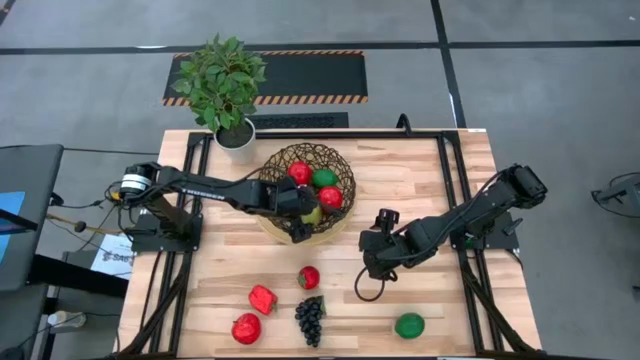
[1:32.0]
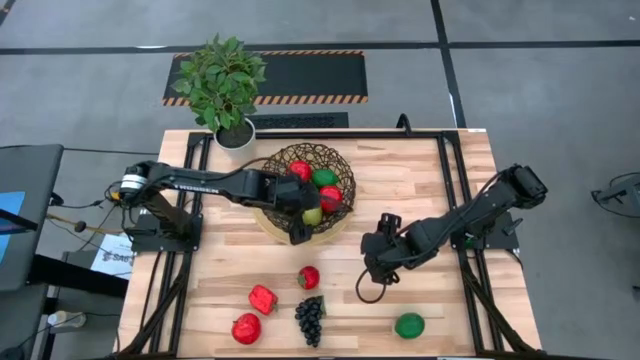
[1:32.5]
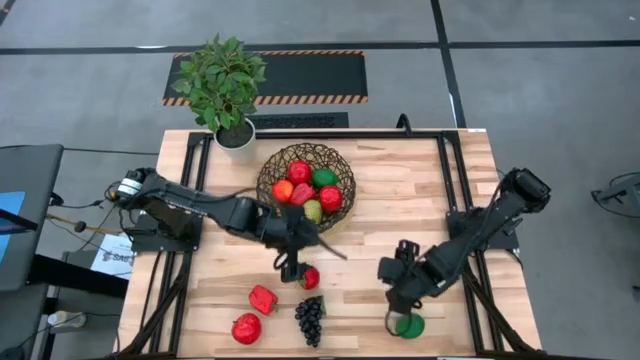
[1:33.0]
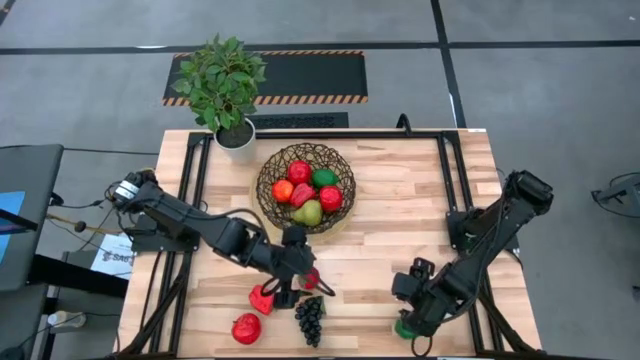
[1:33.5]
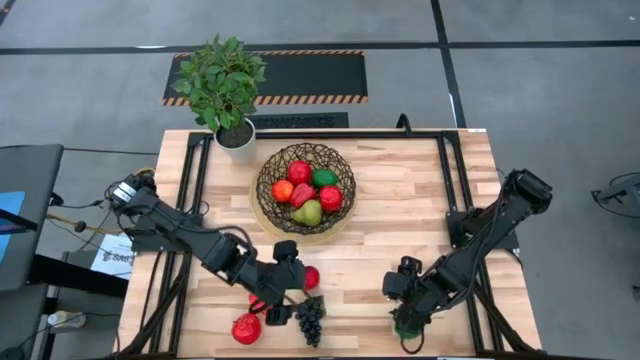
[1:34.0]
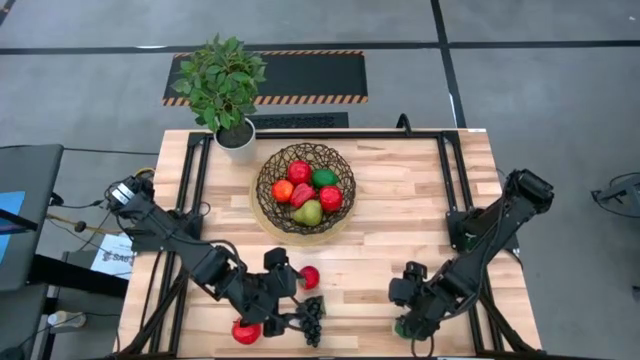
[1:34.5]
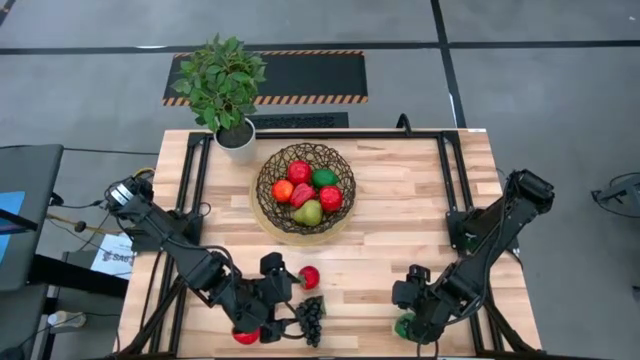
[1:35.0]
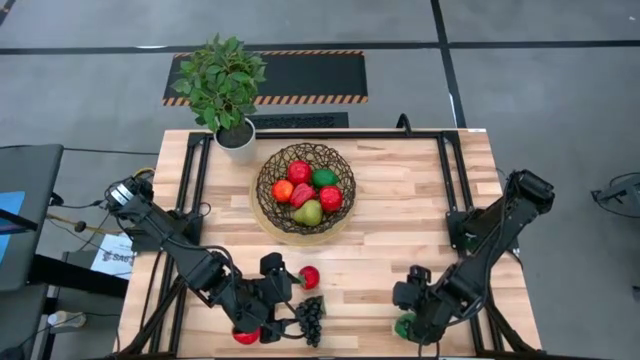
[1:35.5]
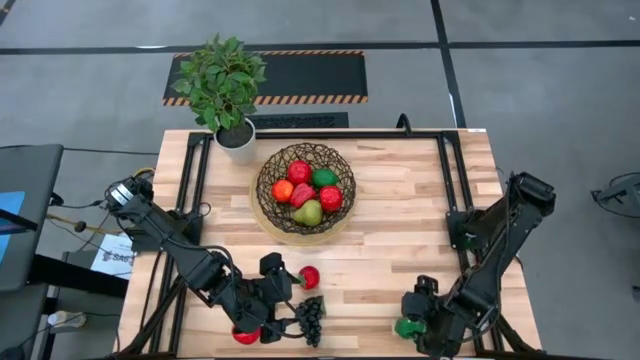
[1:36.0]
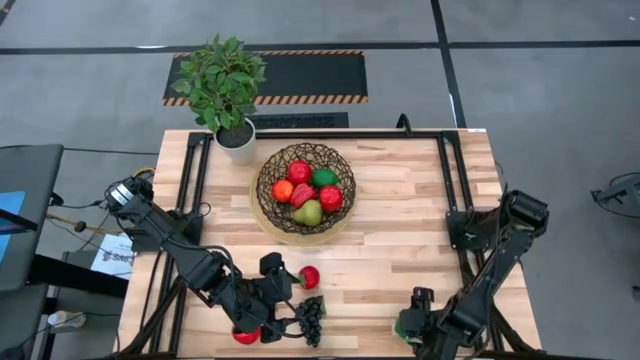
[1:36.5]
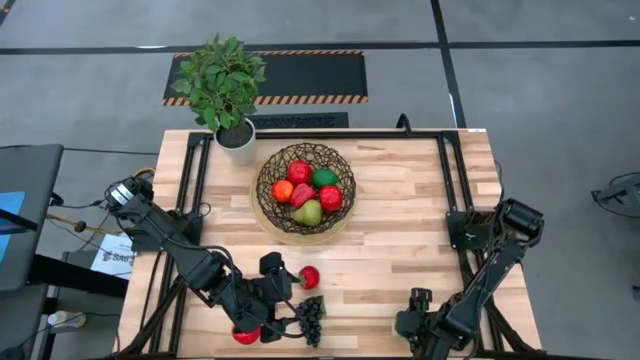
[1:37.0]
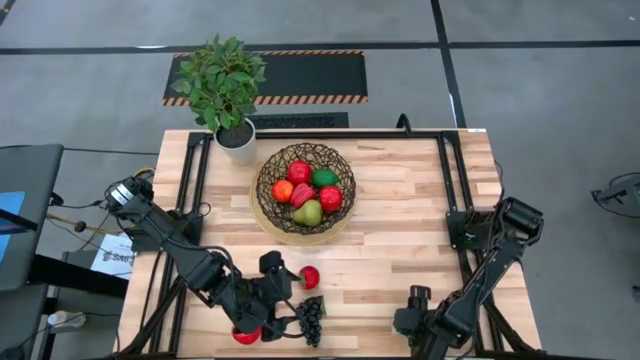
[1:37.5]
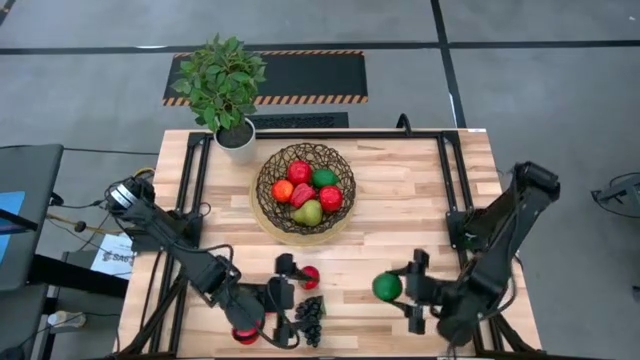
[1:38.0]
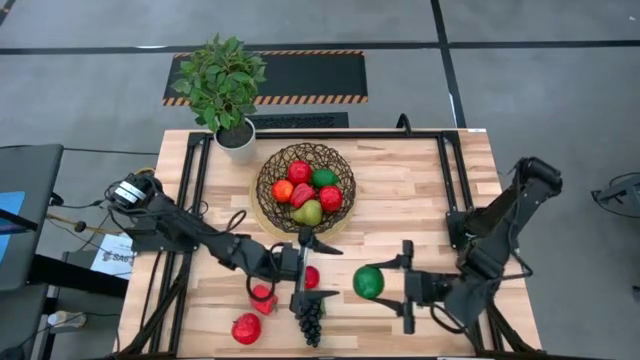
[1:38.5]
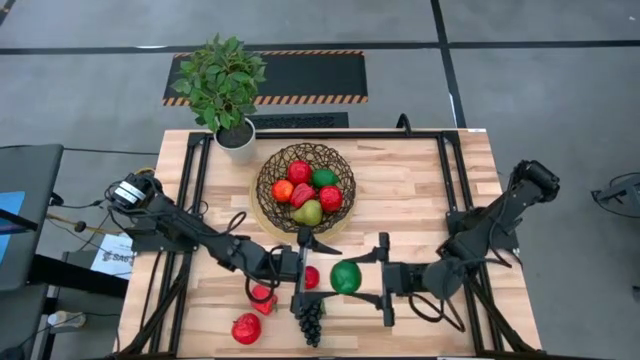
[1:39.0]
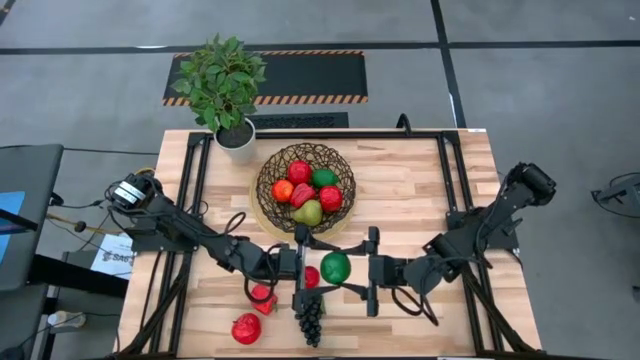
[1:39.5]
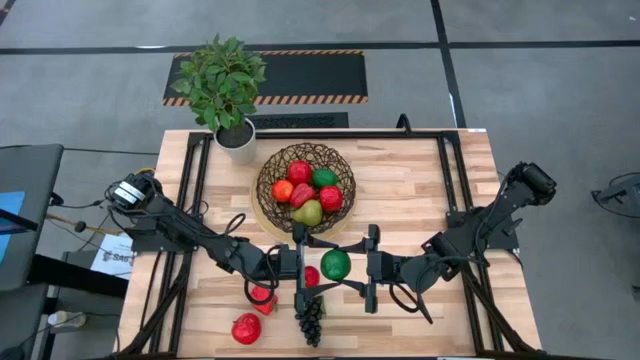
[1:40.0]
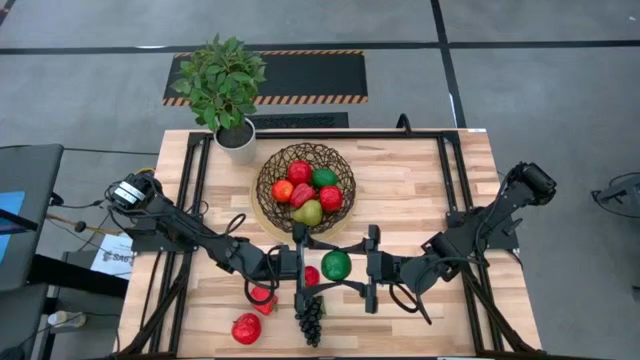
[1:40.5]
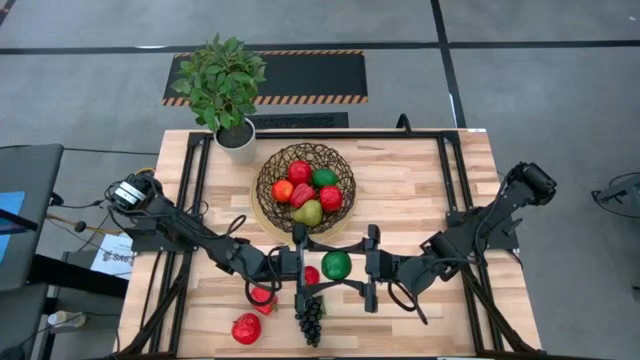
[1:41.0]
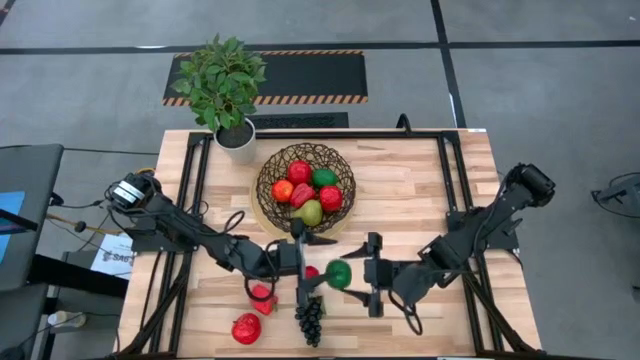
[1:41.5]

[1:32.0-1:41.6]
Task: Build produce basket
Put the green lime into the basket

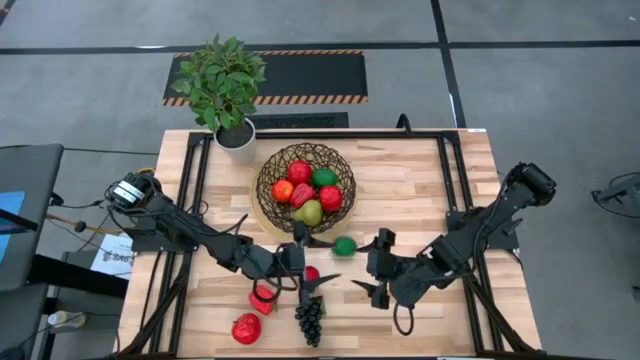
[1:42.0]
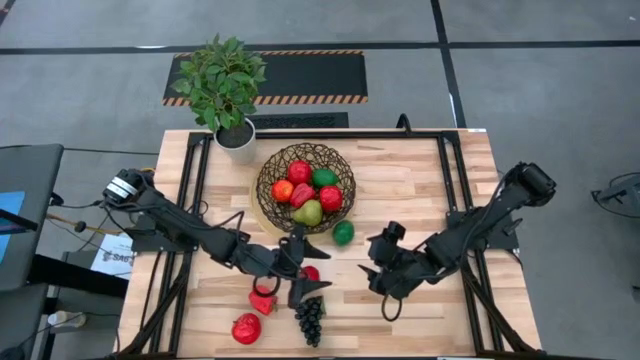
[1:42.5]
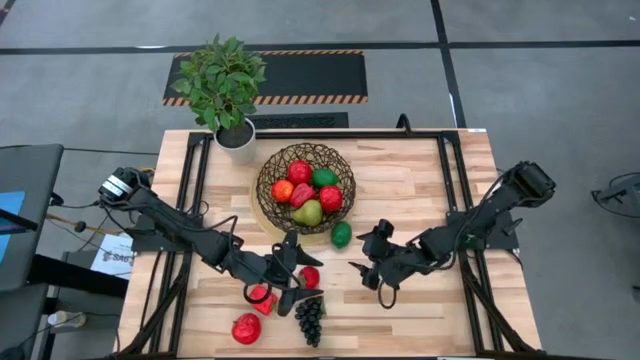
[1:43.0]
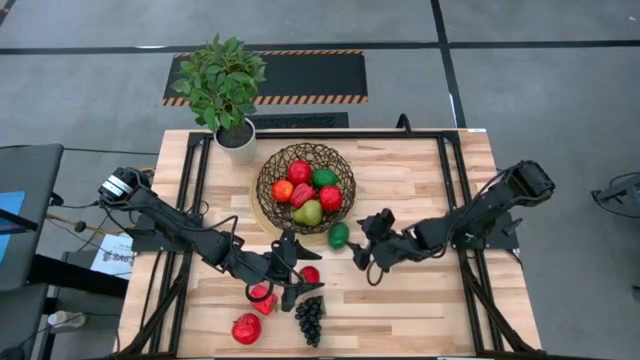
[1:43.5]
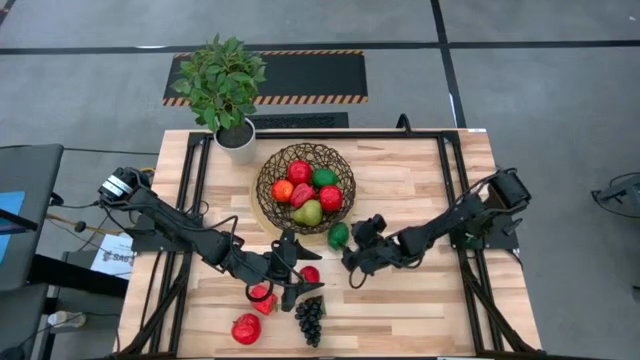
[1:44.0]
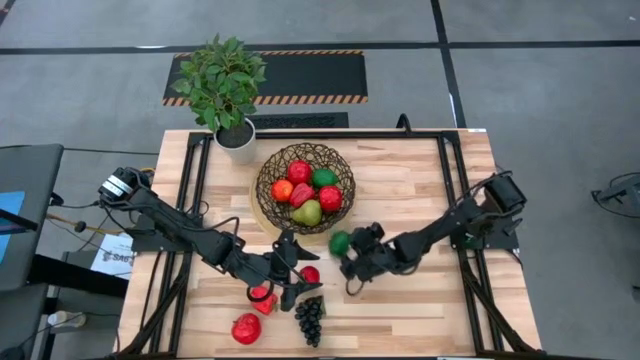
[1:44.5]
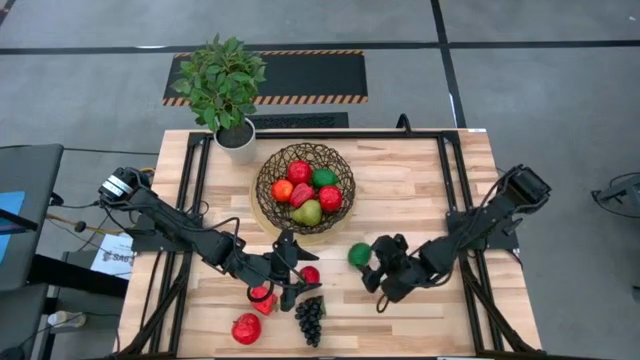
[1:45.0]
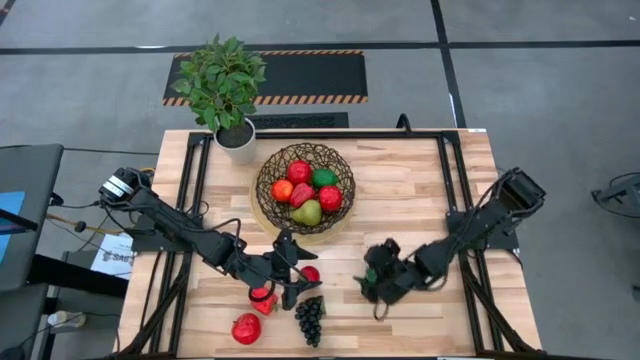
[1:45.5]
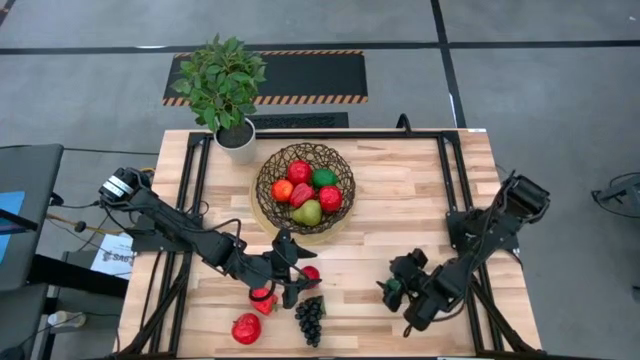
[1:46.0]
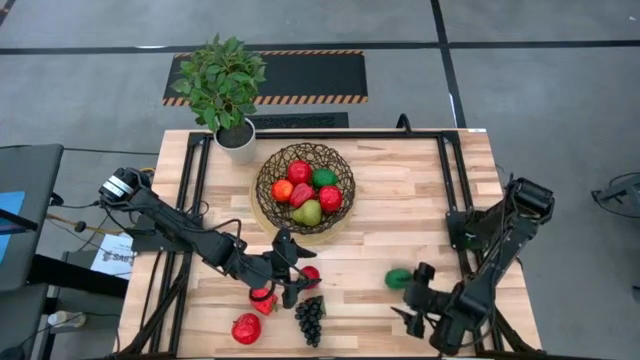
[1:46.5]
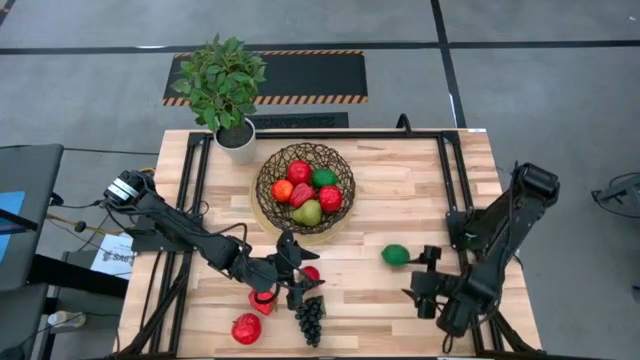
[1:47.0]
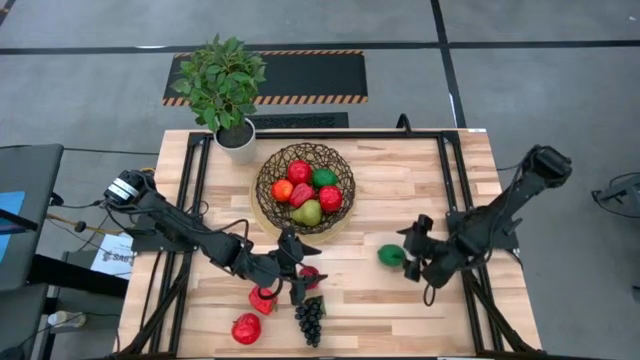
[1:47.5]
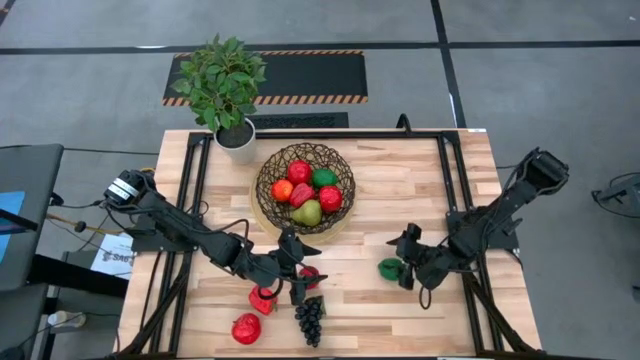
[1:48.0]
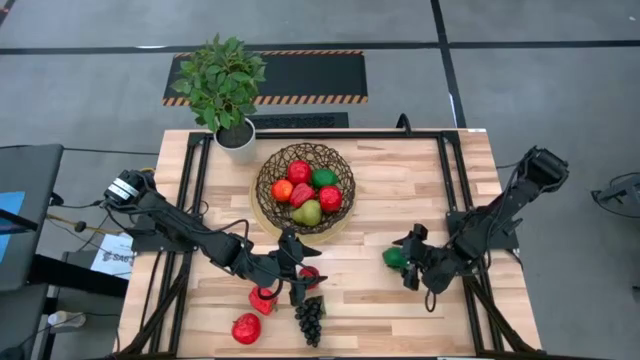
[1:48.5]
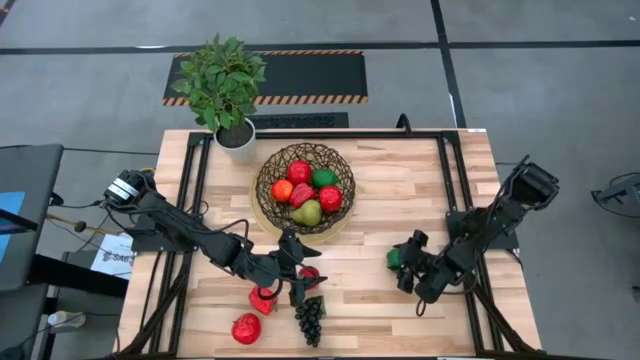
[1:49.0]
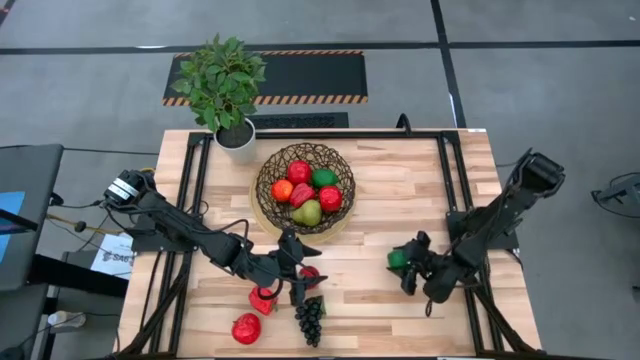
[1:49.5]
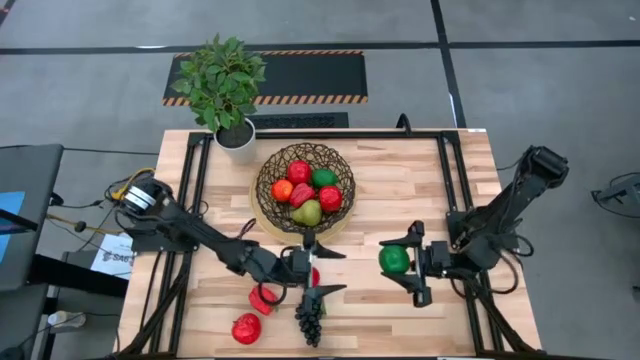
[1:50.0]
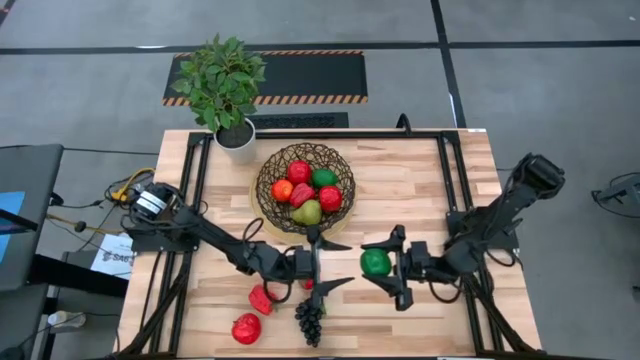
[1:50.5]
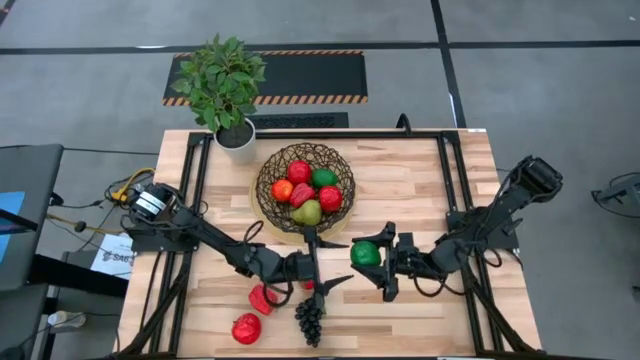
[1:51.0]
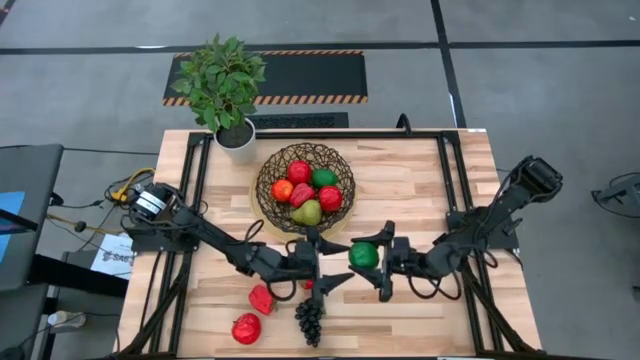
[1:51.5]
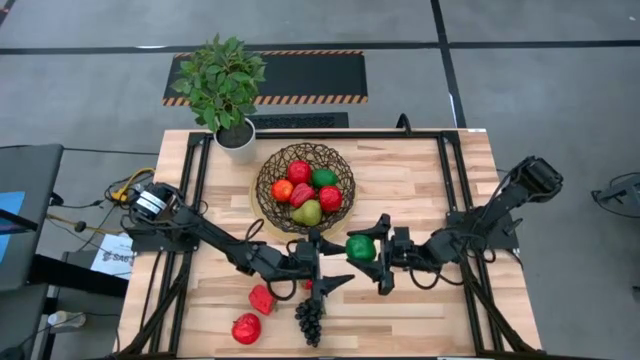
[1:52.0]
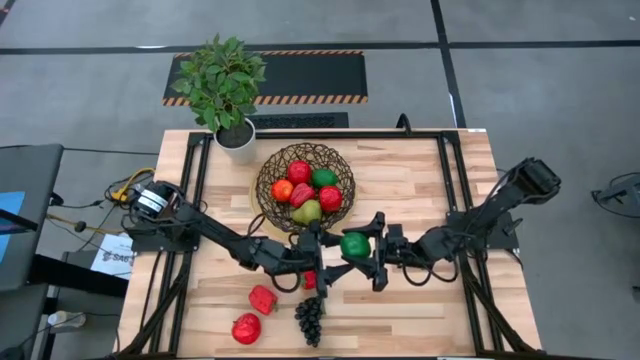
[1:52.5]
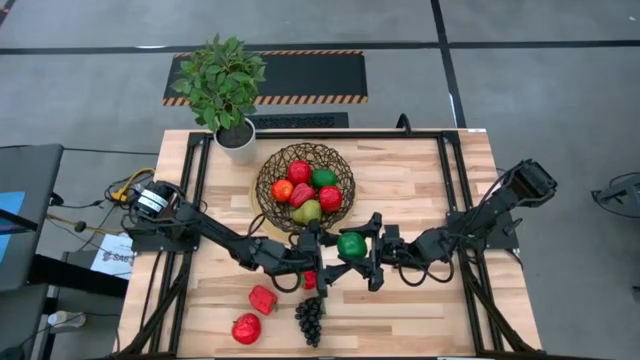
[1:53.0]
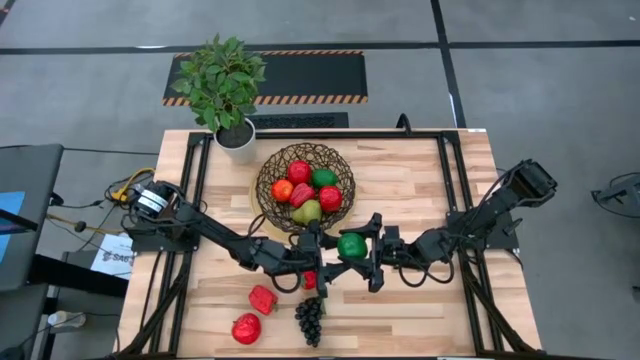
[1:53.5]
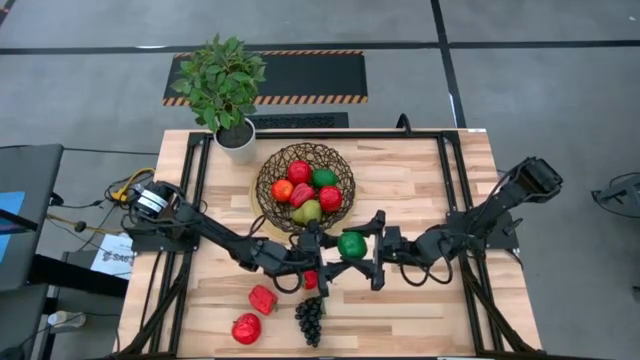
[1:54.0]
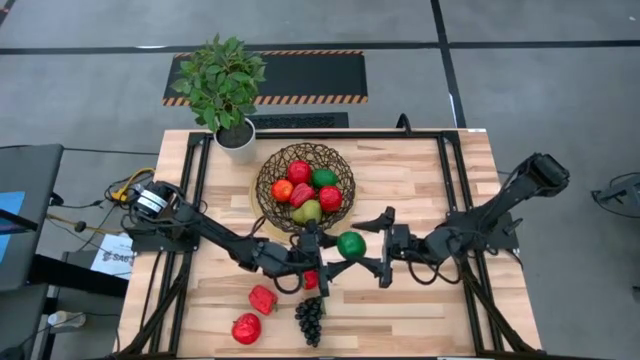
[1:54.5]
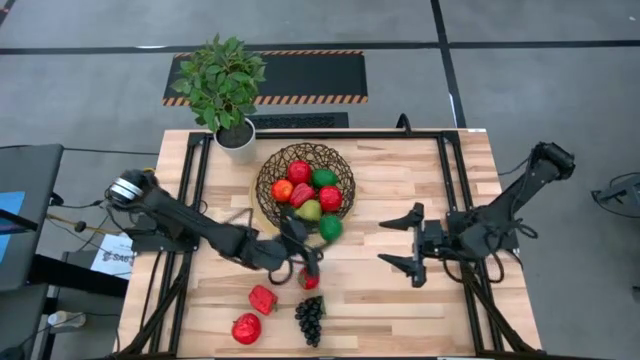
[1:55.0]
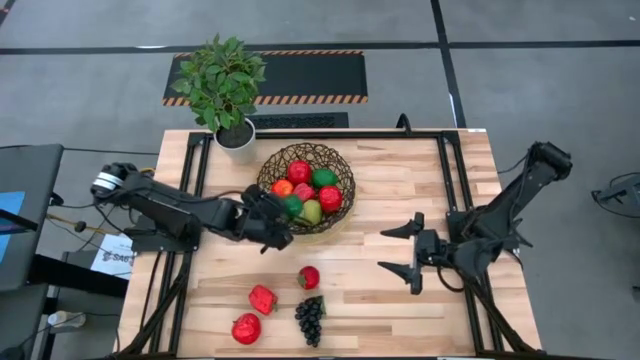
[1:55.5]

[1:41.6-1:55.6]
Put the green lime into the basket
